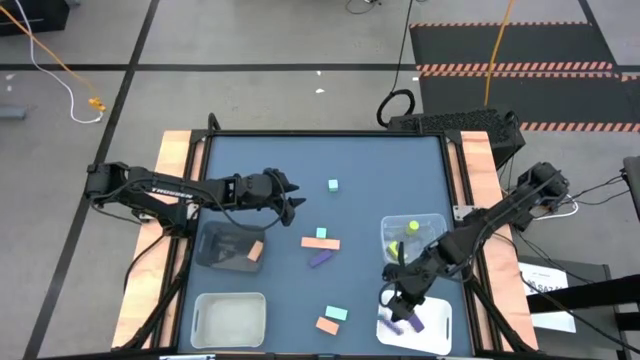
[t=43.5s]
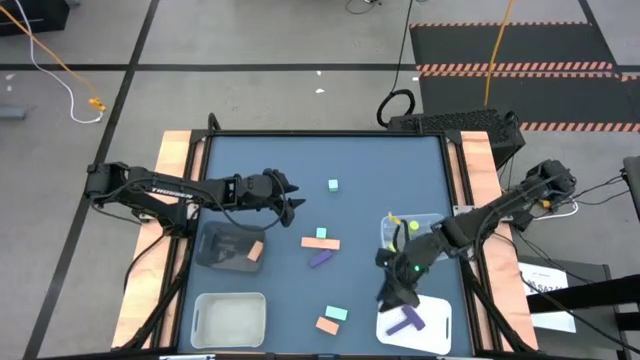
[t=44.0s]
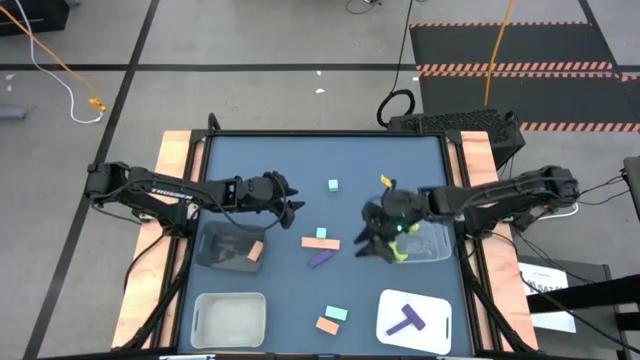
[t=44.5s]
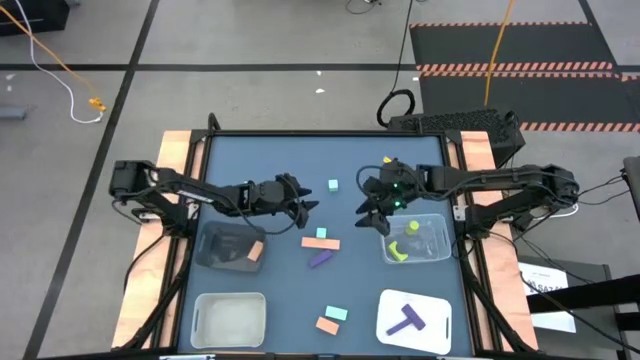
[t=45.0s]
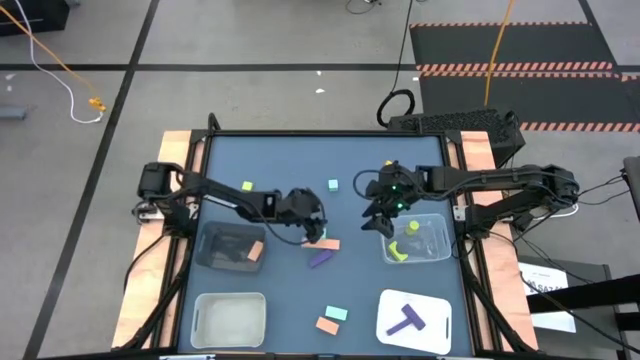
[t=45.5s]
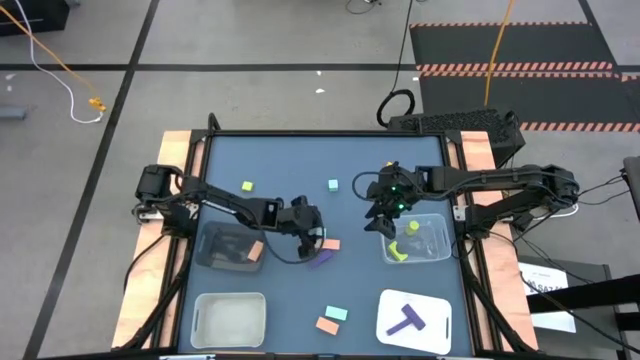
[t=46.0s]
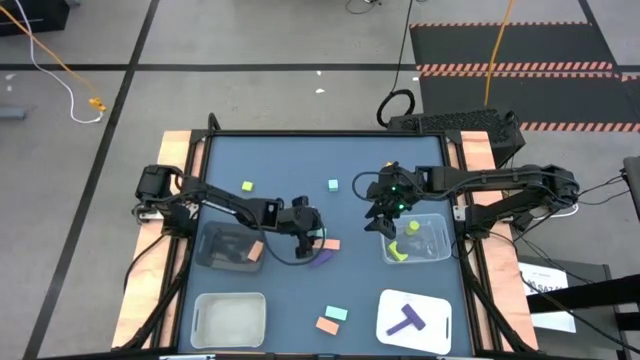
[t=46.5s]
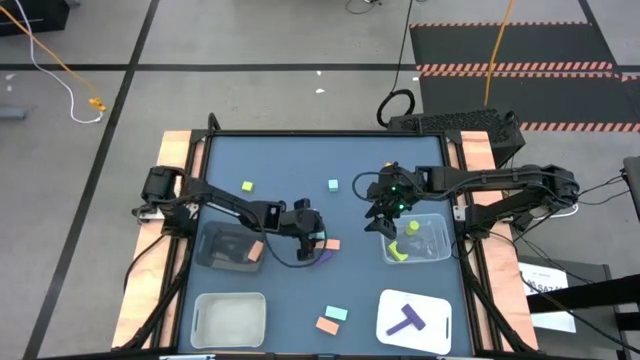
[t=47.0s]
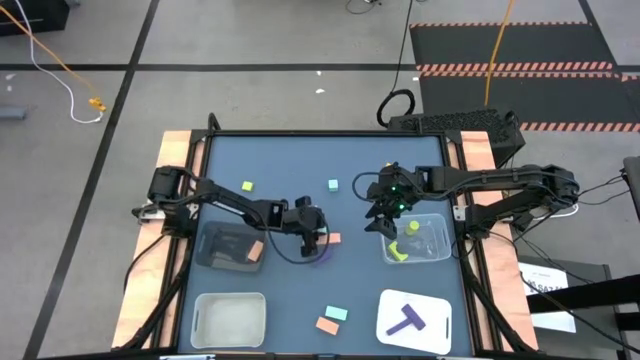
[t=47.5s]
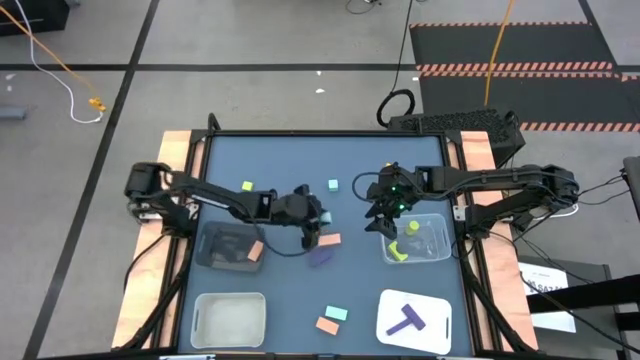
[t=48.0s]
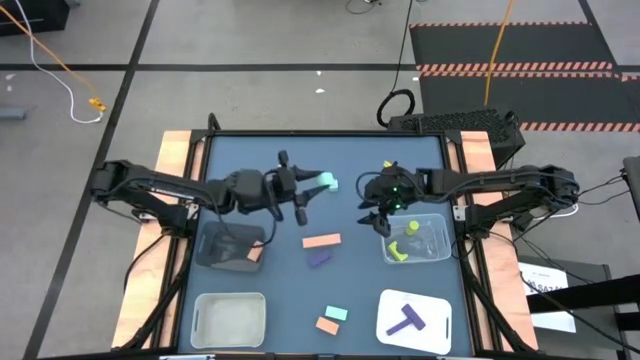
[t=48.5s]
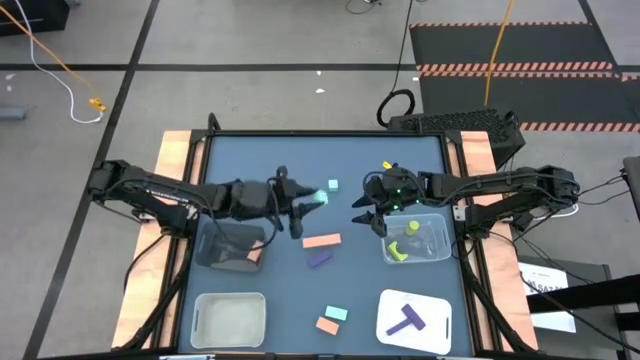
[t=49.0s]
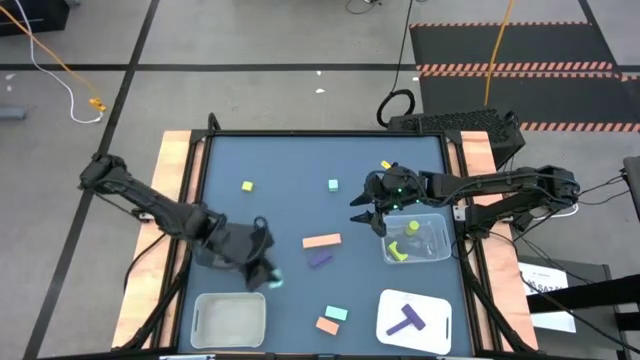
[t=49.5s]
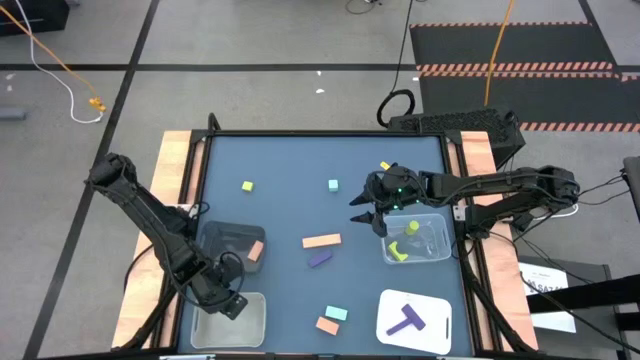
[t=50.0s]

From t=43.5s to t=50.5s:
Task: Sort & place blocks by color
Put the middle blue block into the gray bin

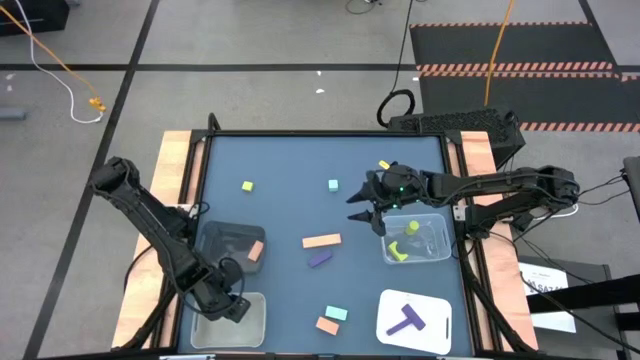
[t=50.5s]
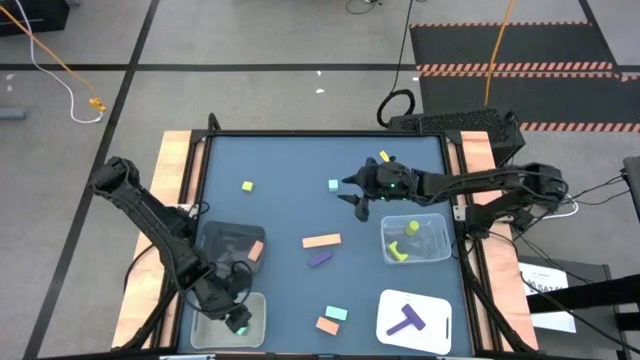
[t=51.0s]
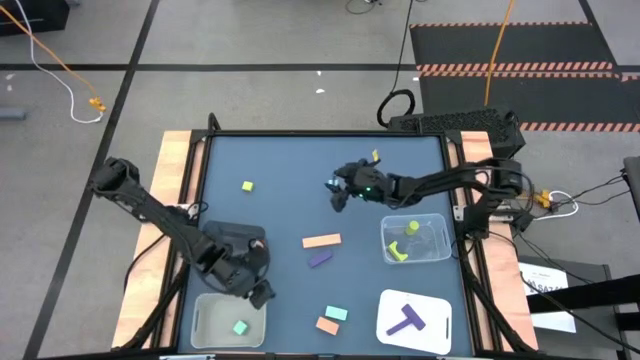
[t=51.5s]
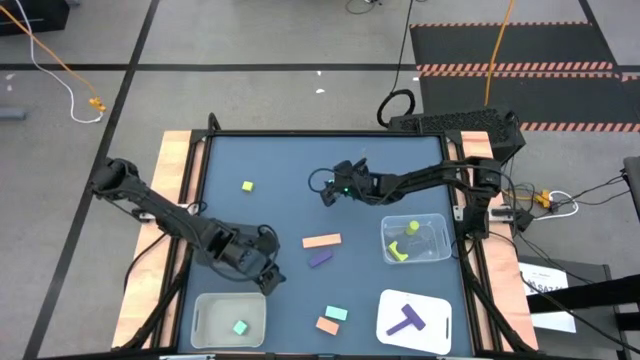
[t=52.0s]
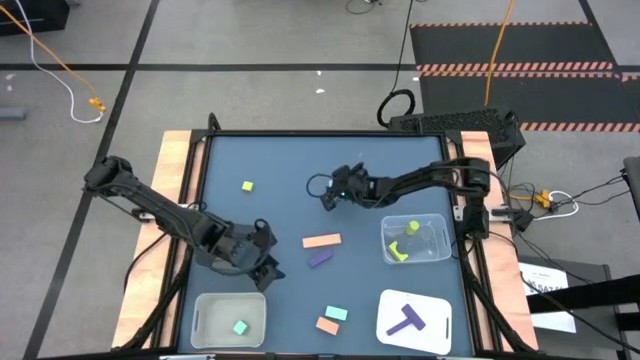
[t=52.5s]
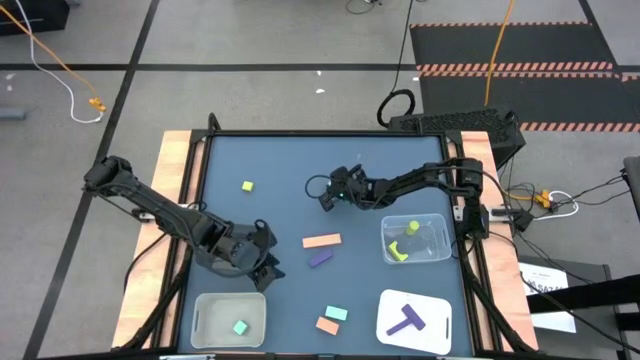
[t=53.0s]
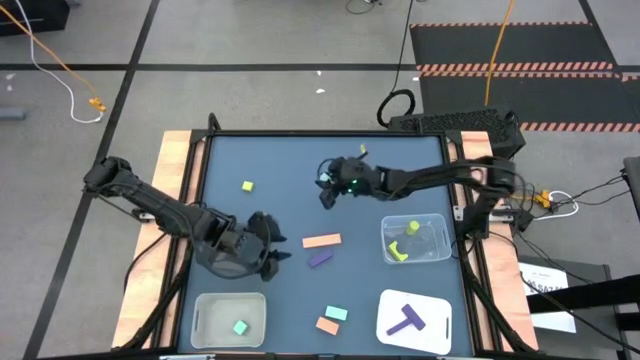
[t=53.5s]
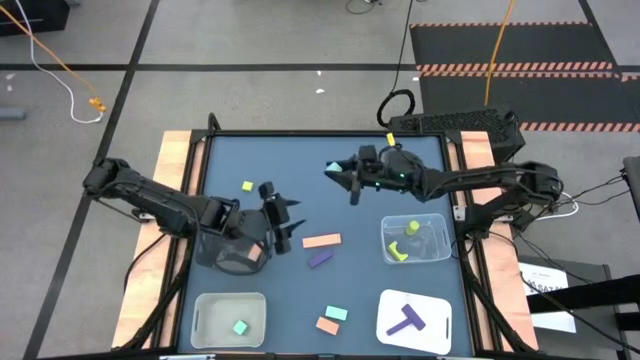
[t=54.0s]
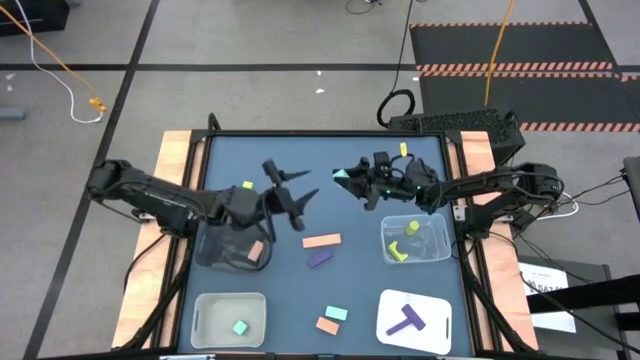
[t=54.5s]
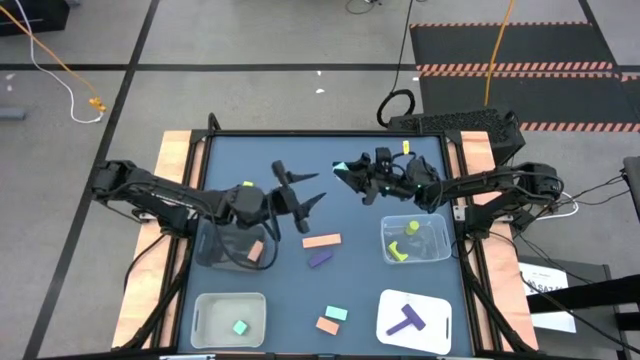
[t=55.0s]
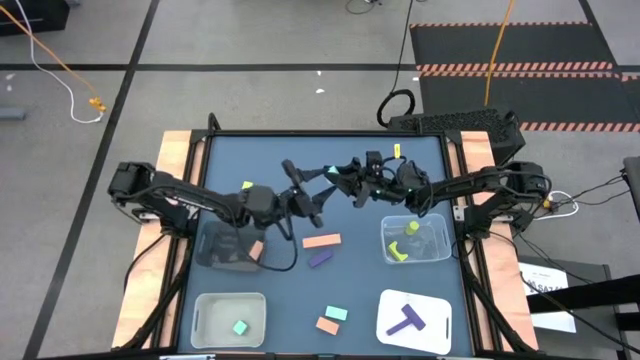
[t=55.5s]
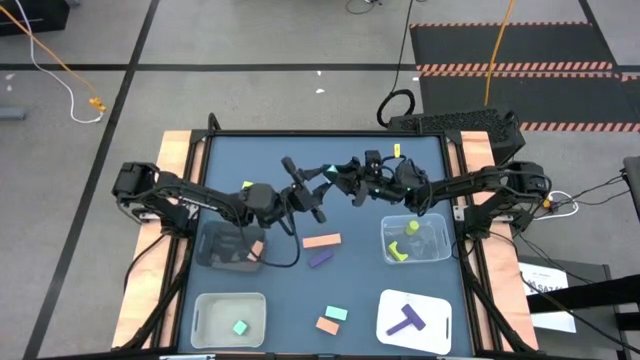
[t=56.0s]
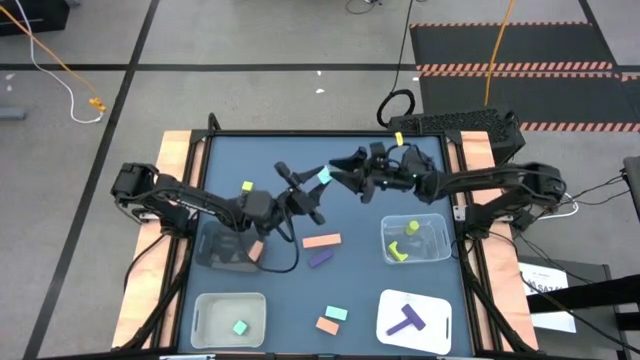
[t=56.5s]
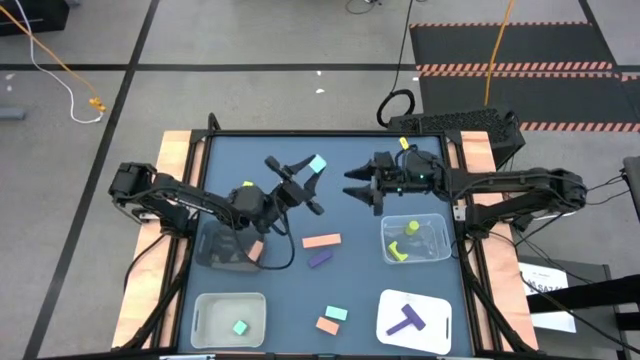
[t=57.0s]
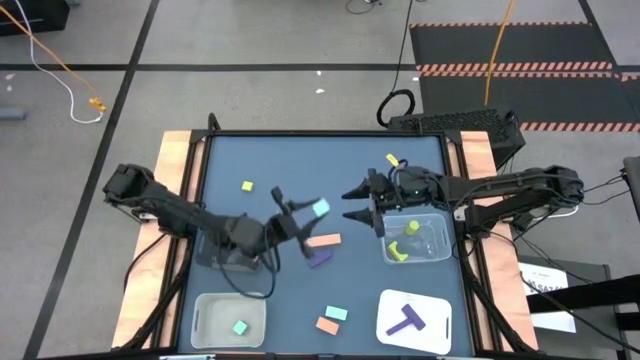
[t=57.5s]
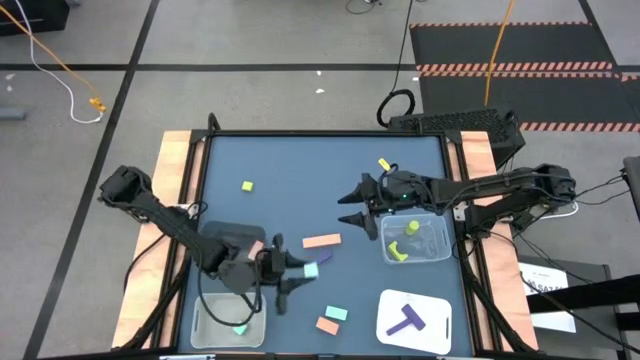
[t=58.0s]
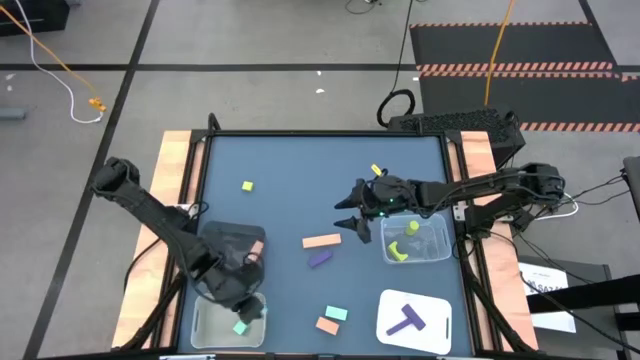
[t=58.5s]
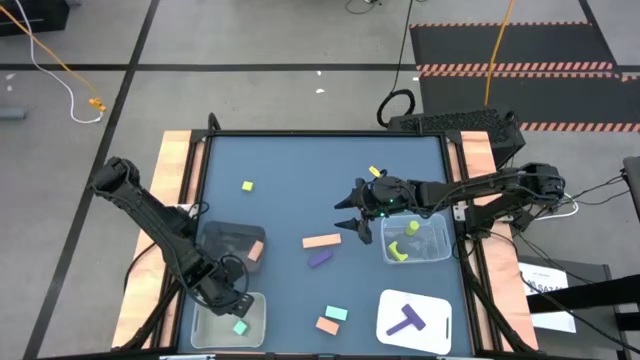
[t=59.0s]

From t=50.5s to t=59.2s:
Put the top blue block into the gray bin

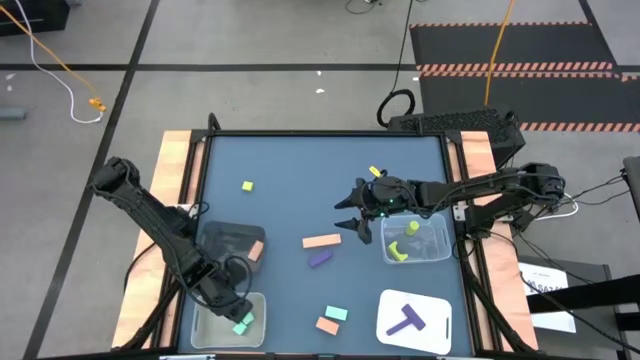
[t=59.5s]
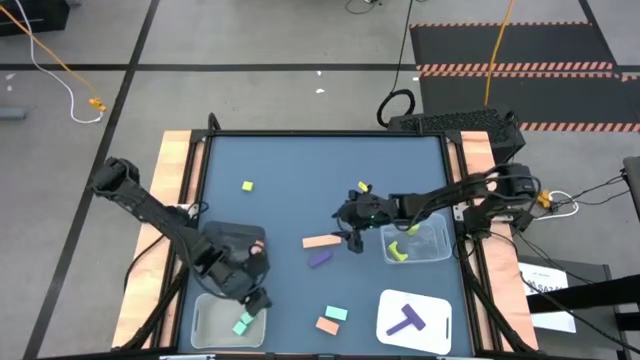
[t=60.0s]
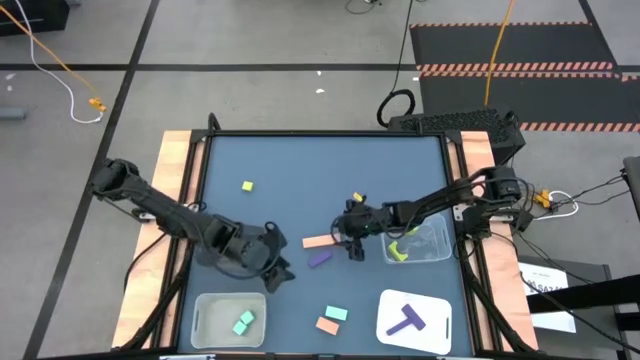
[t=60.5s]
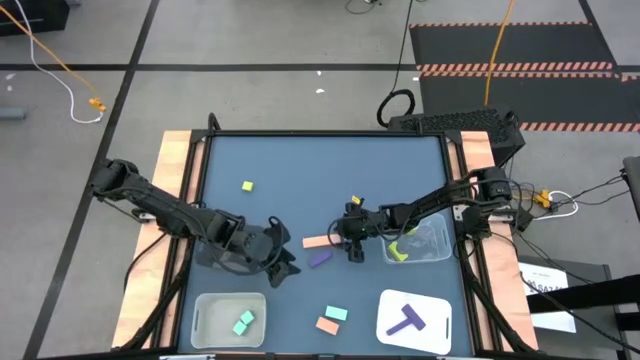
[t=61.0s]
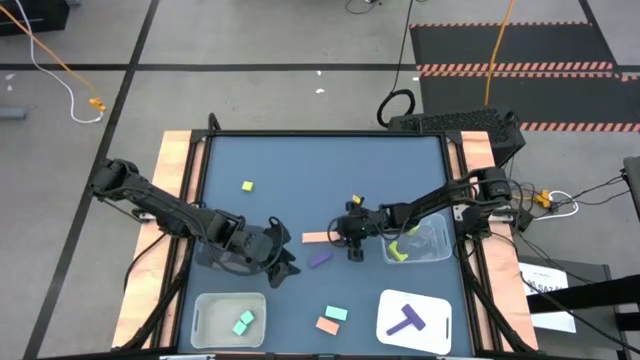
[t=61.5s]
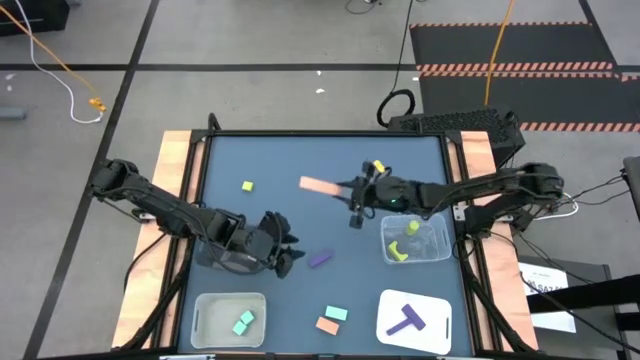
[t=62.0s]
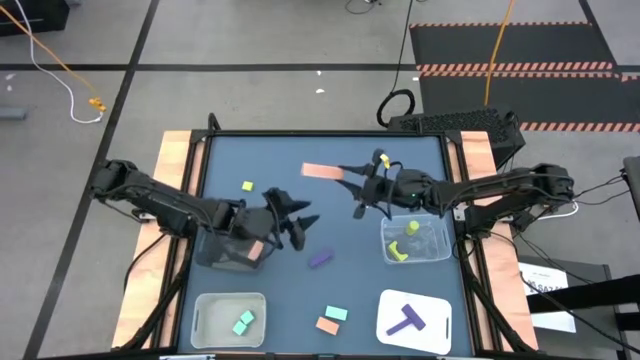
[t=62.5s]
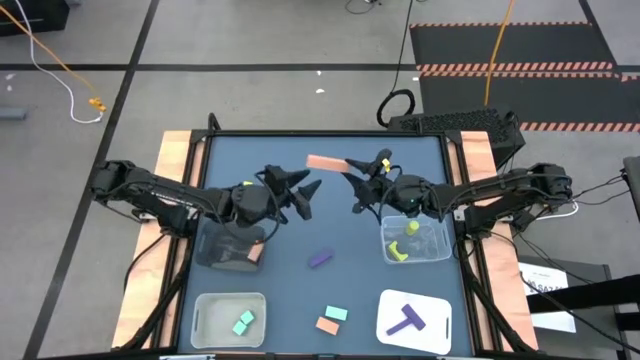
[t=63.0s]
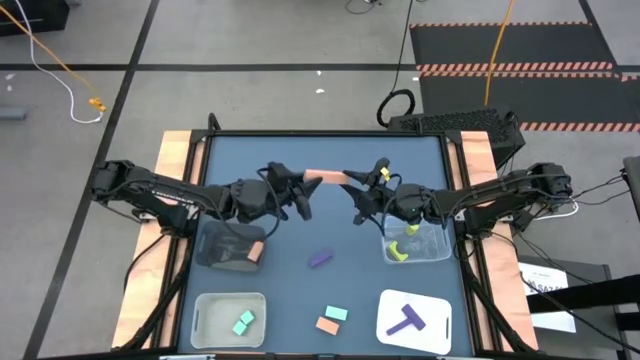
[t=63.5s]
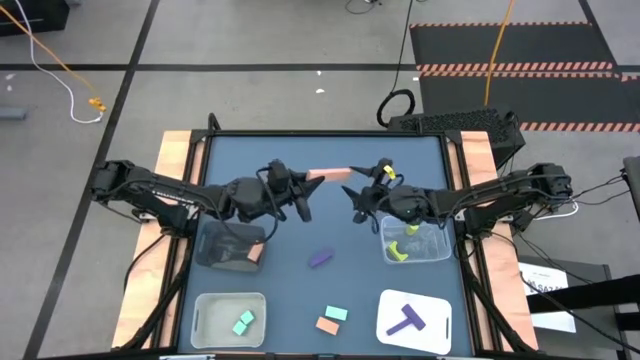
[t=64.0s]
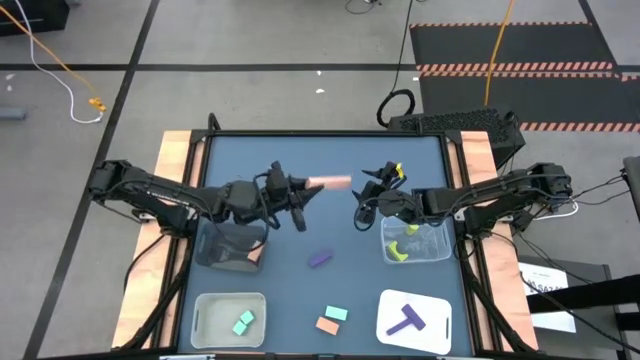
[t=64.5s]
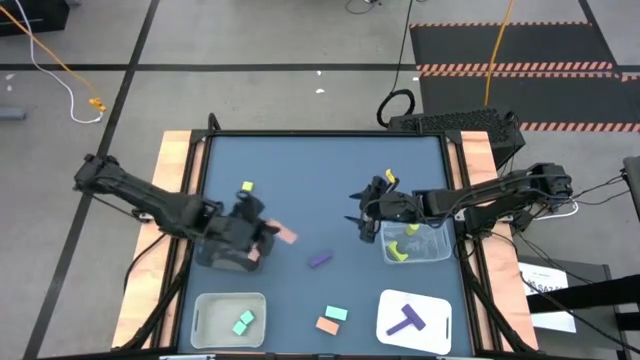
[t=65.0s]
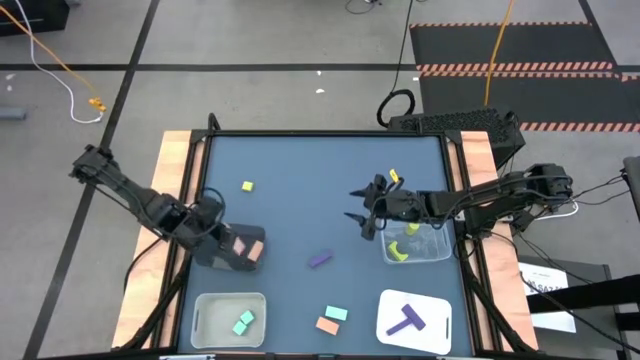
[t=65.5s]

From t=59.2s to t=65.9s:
Put the top brown block into the black bin
